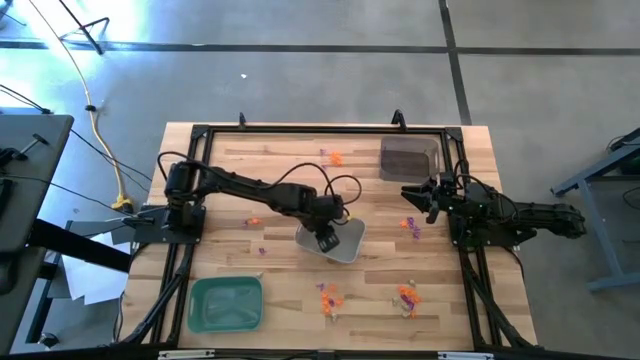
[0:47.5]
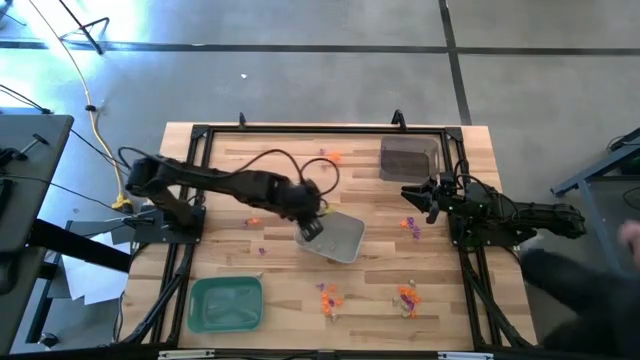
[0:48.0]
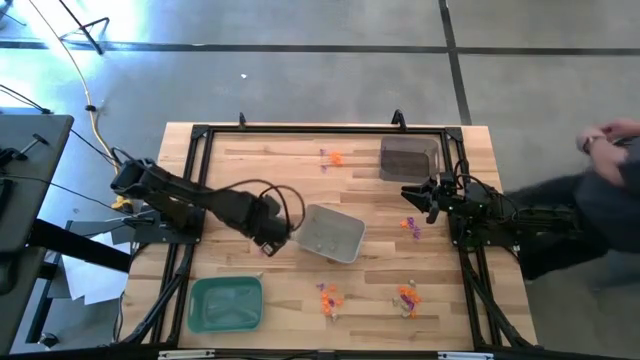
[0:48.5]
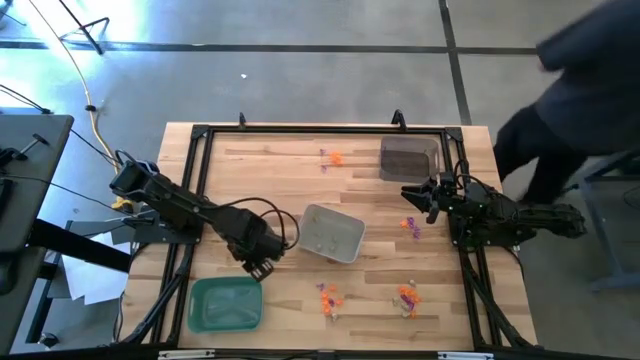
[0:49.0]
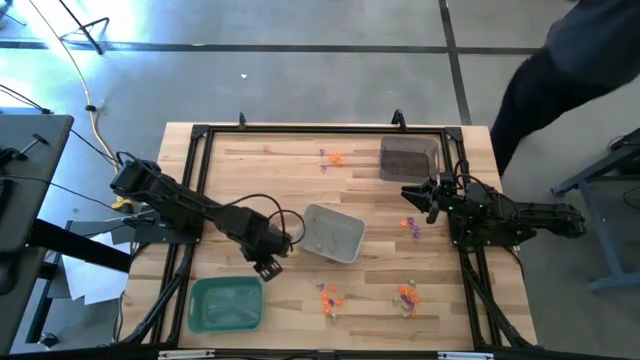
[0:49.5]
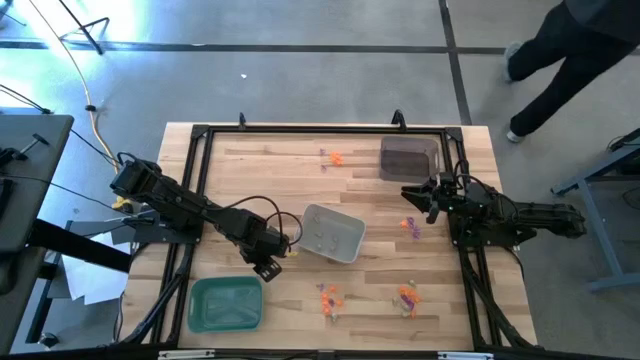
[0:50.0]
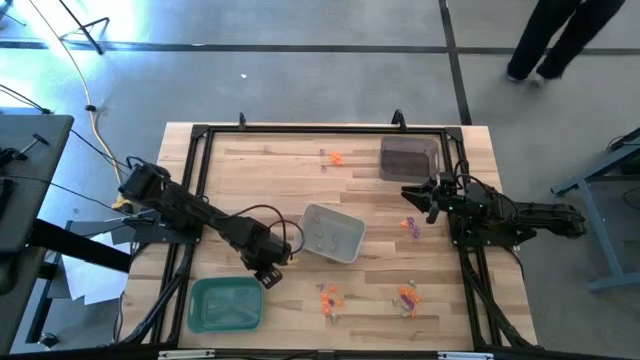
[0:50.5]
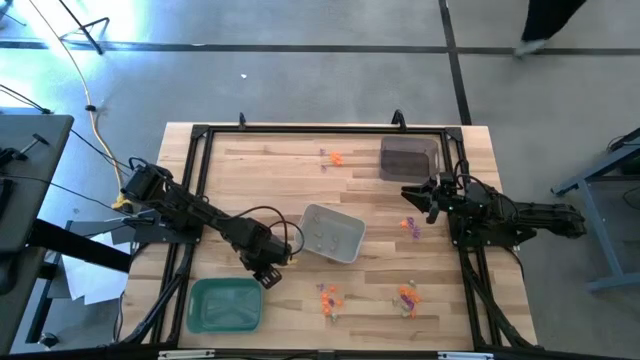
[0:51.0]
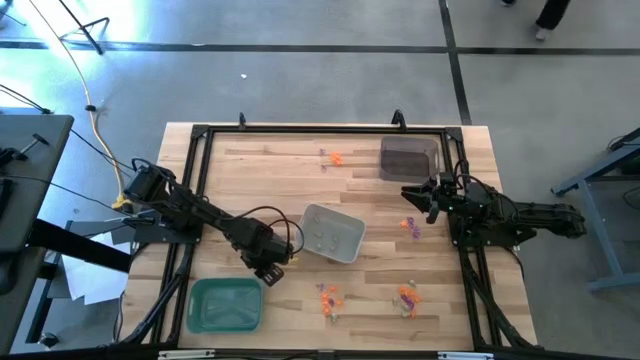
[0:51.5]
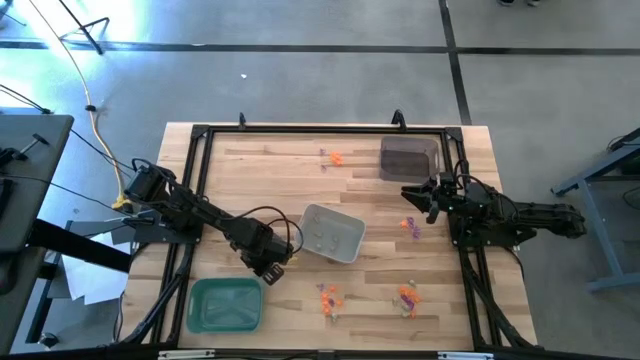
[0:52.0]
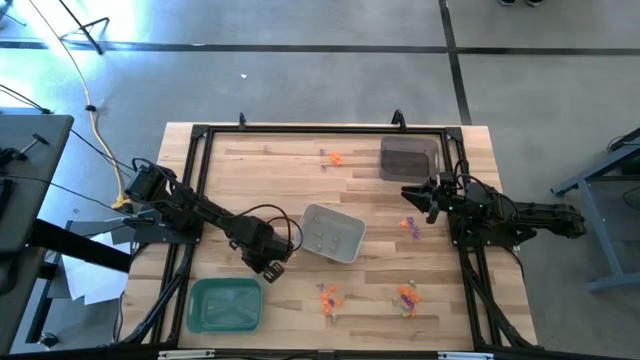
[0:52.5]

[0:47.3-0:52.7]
Task: Sort Halloween decoration
Put the white skull toy into the white bin

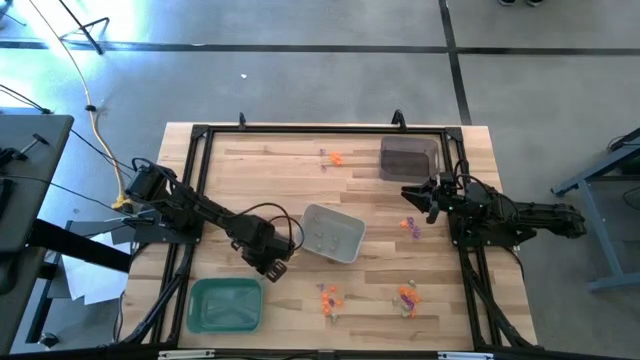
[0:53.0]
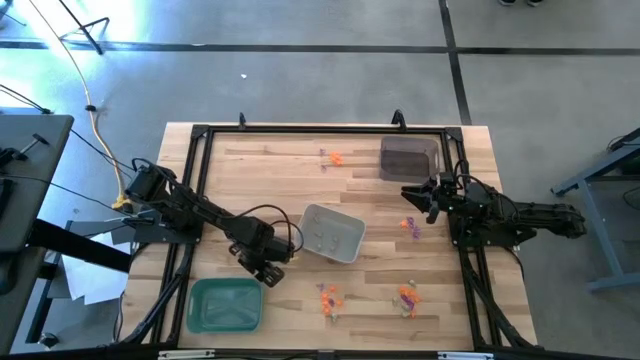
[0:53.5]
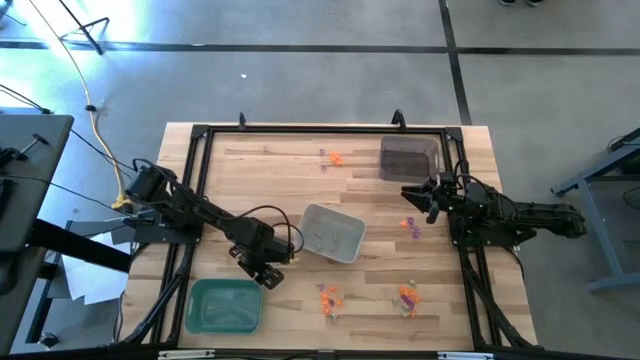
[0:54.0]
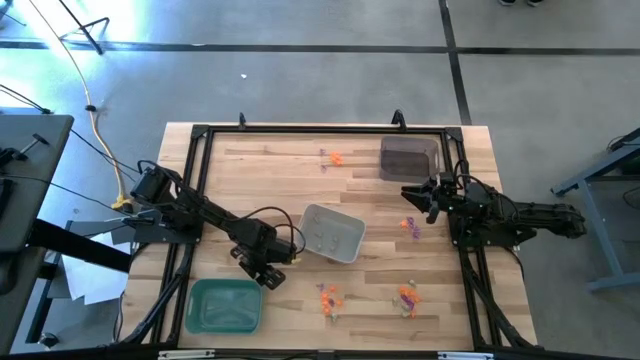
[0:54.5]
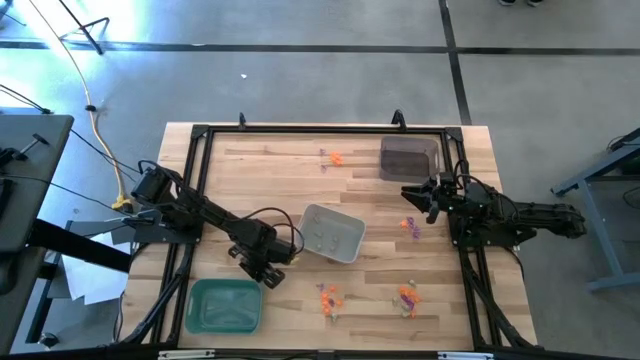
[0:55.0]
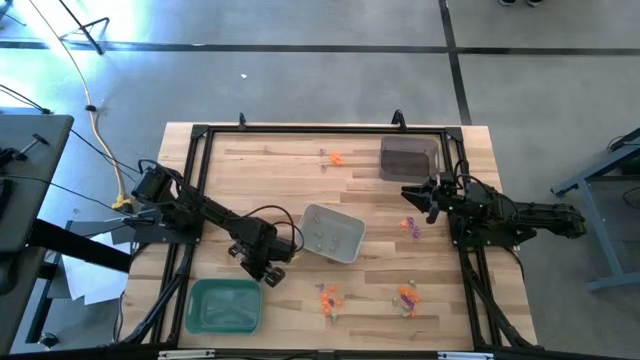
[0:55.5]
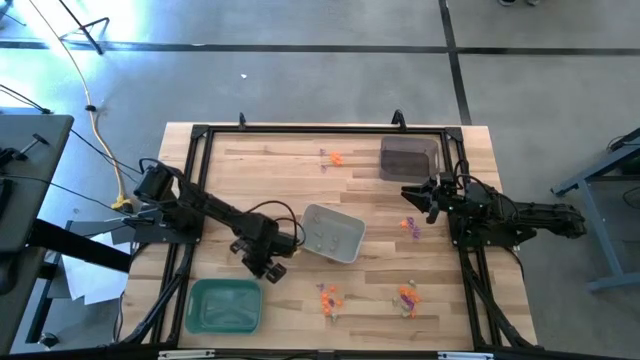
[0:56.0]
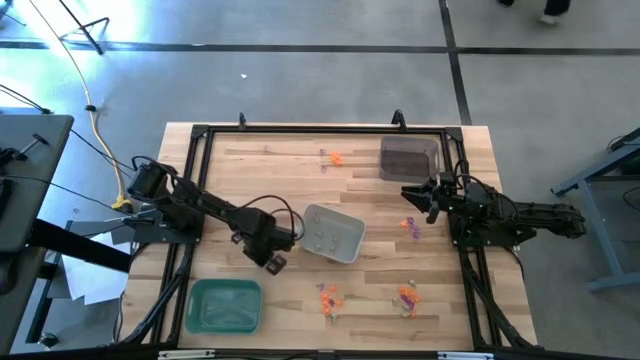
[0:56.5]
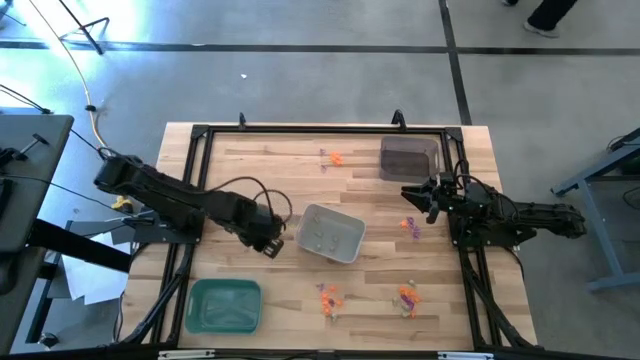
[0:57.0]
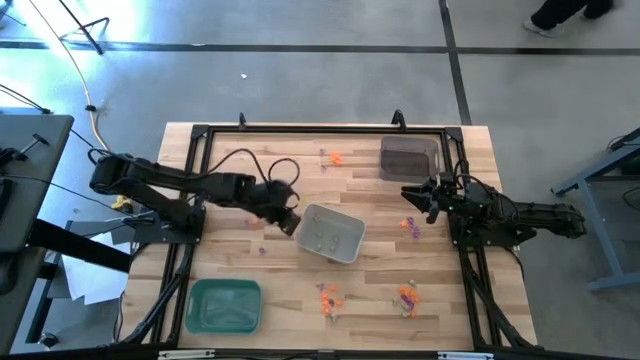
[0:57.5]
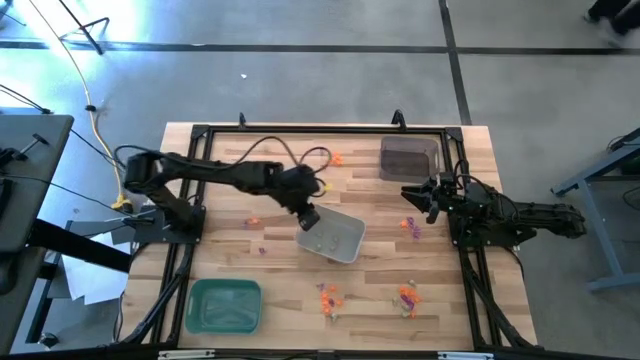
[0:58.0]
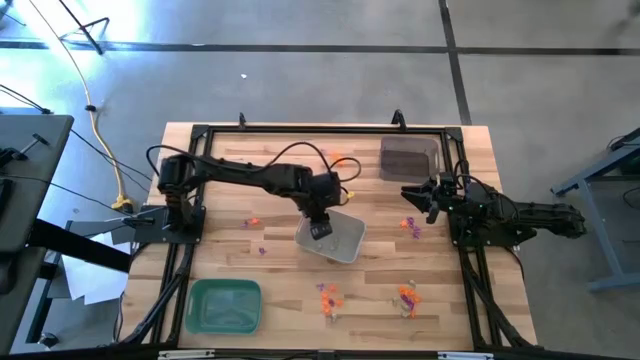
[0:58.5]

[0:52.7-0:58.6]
Put the white skull toy into the white bin

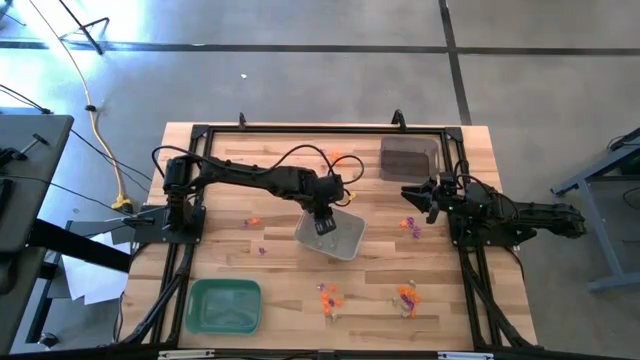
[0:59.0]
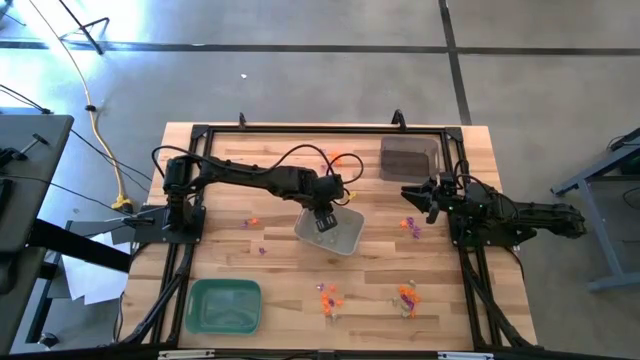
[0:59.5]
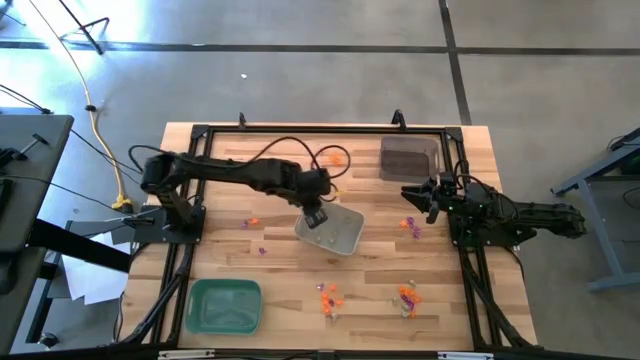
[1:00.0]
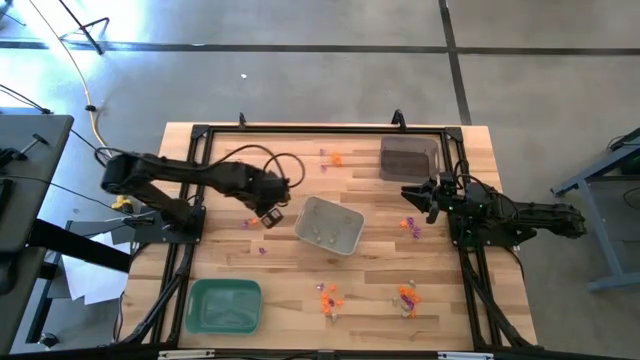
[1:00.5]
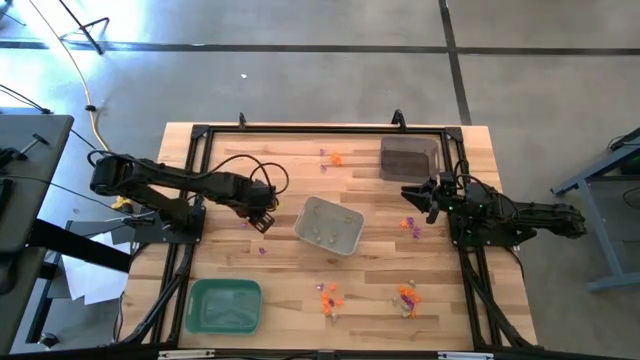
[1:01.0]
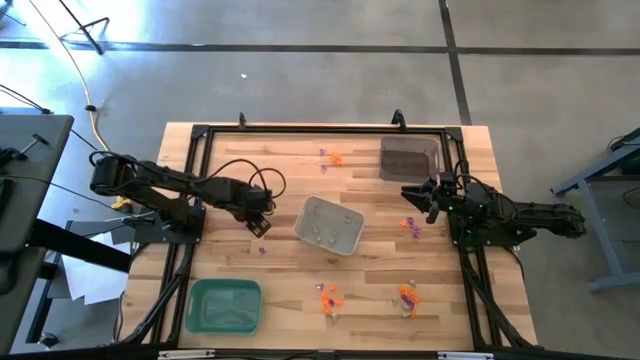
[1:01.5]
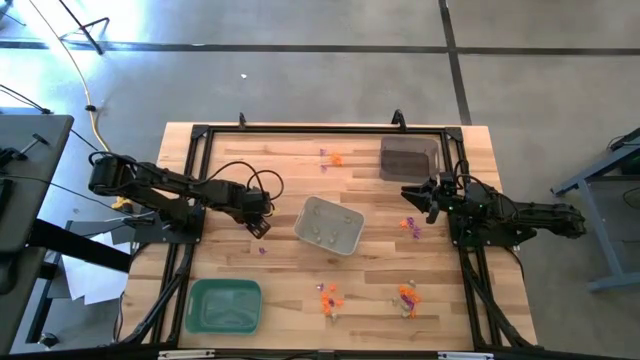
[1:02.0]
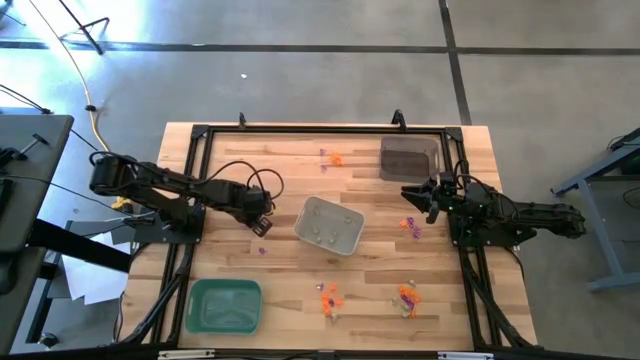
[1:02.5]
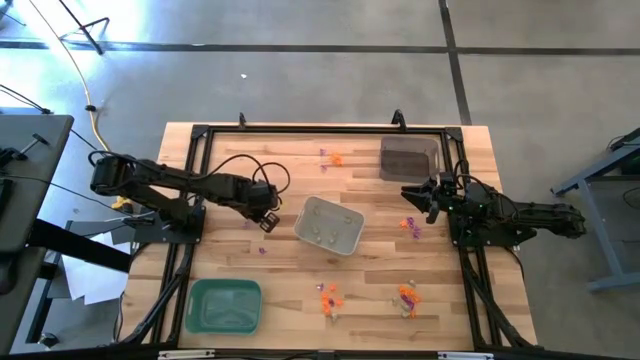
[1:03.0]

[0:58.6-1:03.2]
Put the orange spider toy into the green bin

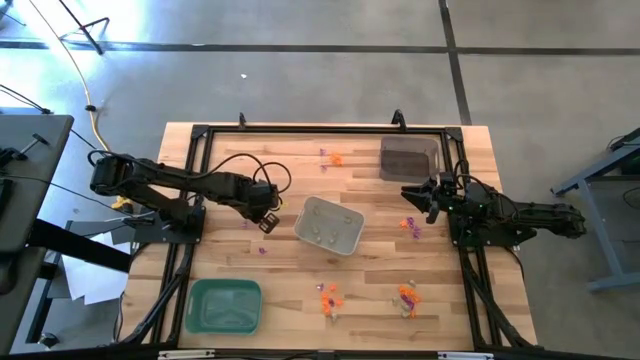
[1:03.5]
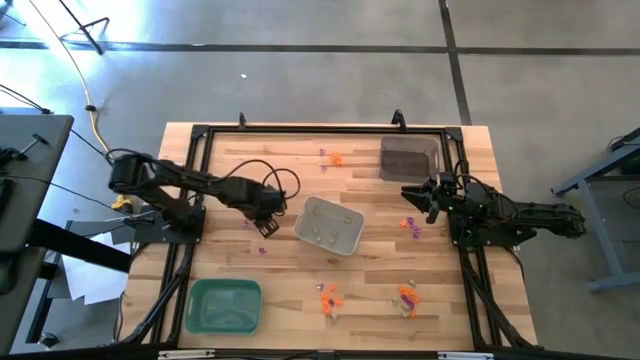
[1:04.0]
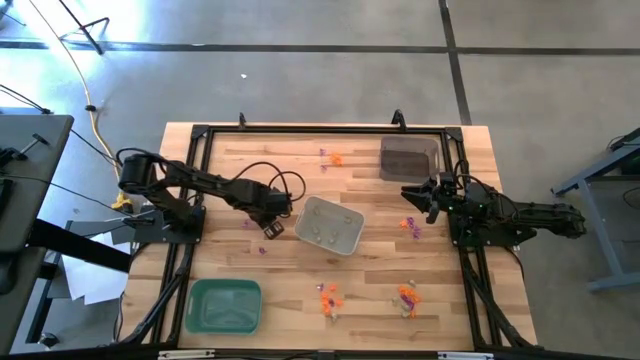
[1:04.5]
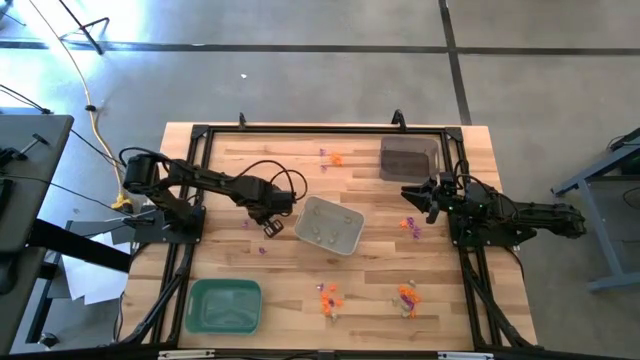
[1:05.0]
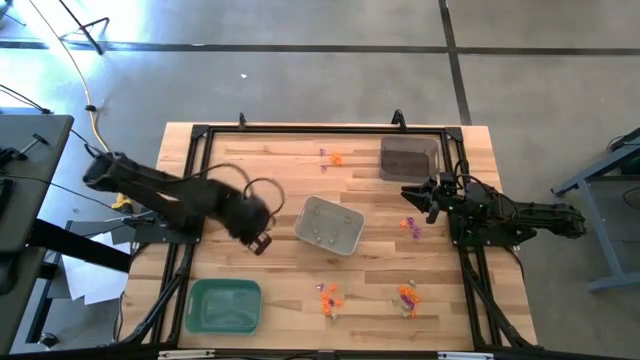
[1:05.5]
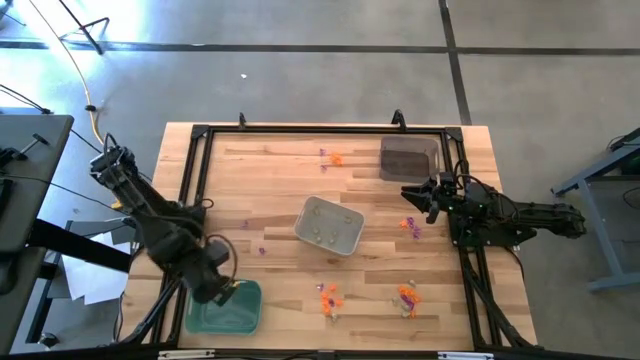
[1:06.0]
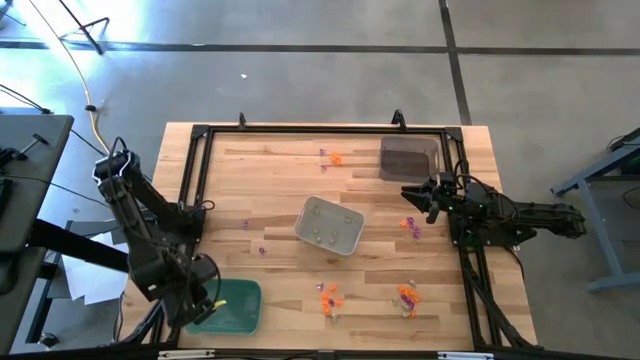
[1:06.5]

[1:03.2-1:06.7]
Put the orange spider toy into the green bin

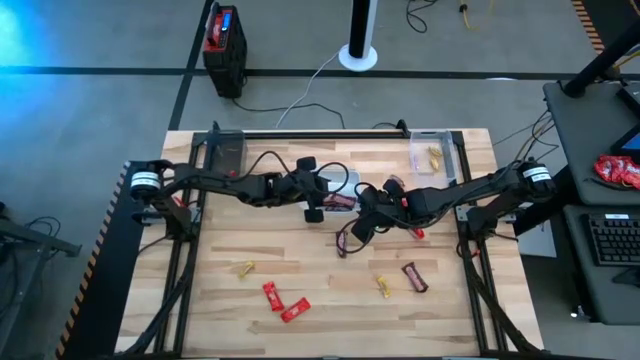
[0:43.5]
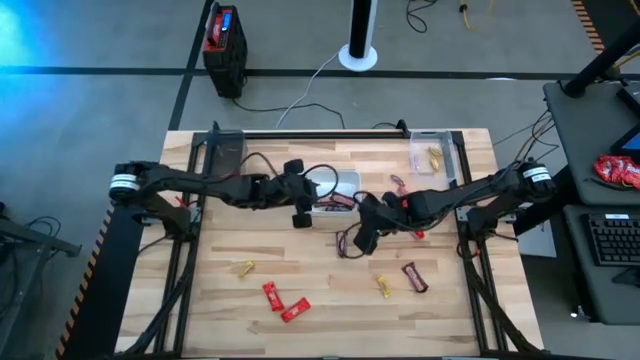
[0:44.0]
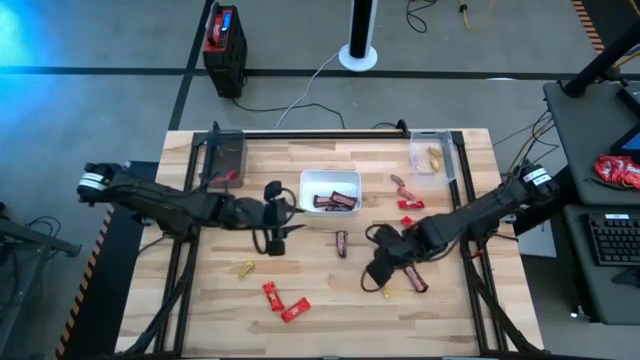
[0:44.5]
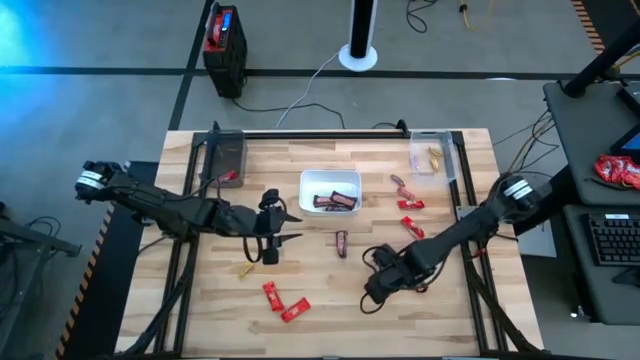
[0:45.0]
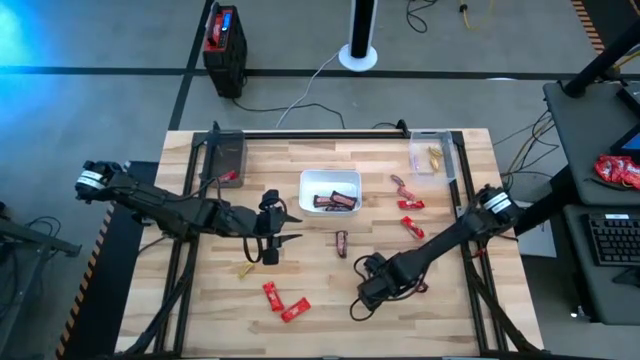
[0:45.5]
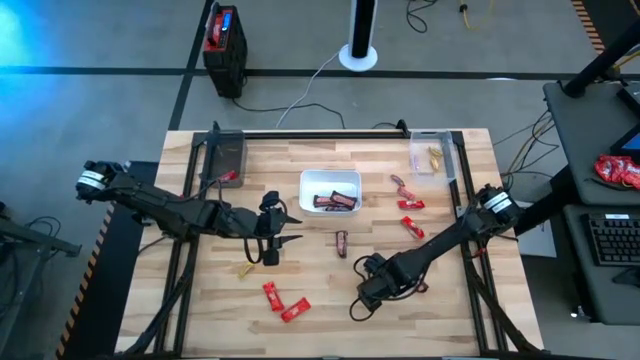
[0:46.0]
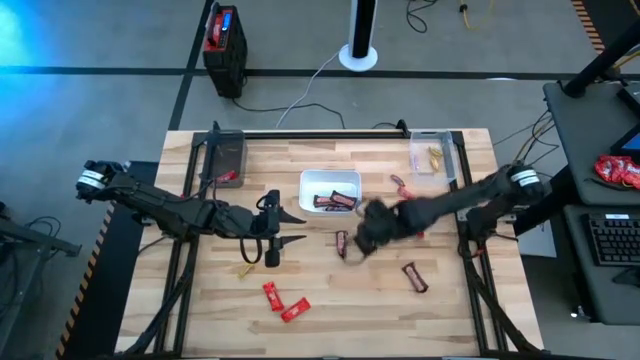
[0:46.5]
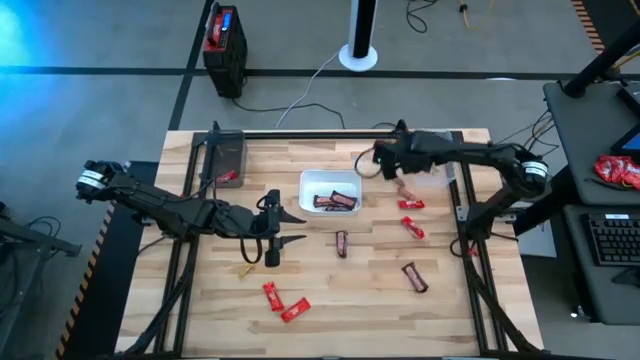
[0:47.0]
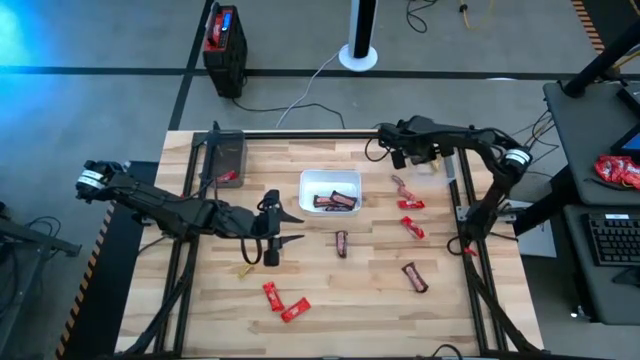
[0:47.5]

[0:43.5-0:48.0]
Task: Sort candy by brand, put in halloween buckets
Put the yellow candy into the transparent bin
